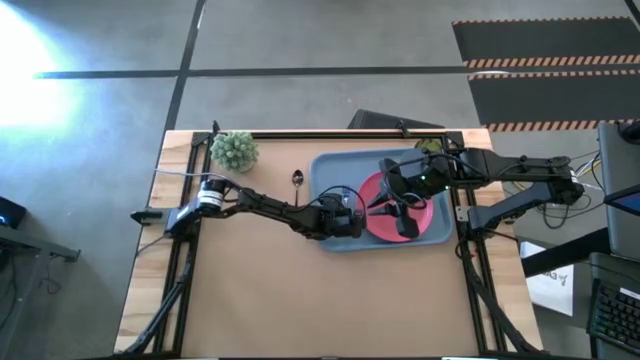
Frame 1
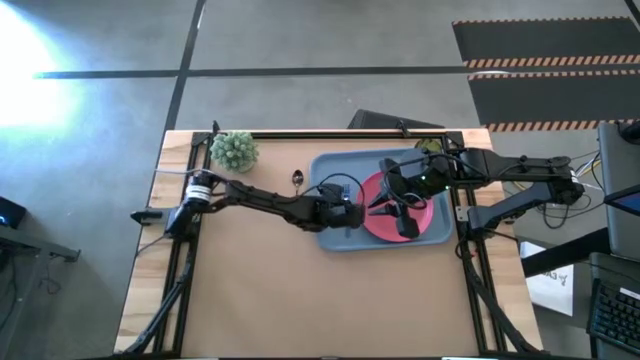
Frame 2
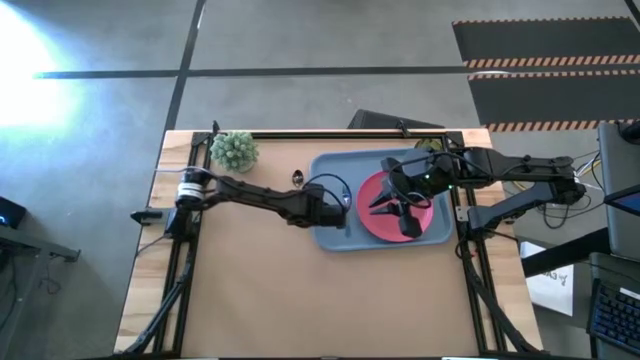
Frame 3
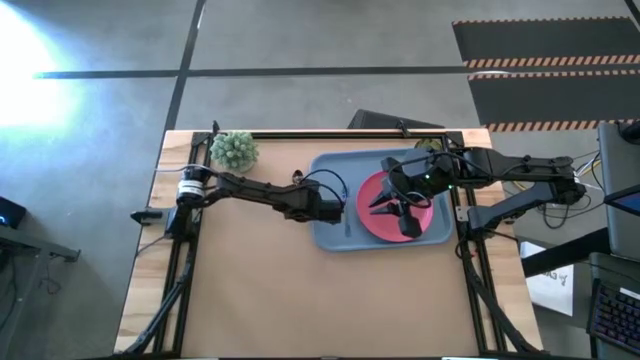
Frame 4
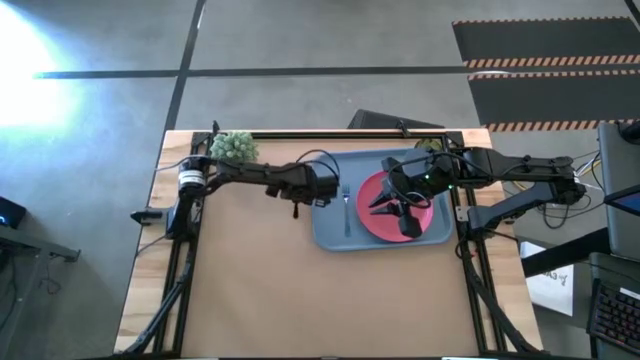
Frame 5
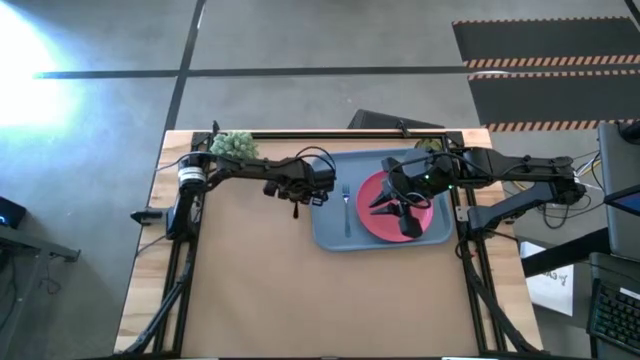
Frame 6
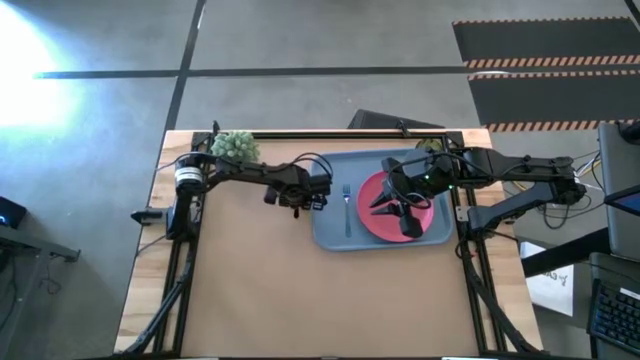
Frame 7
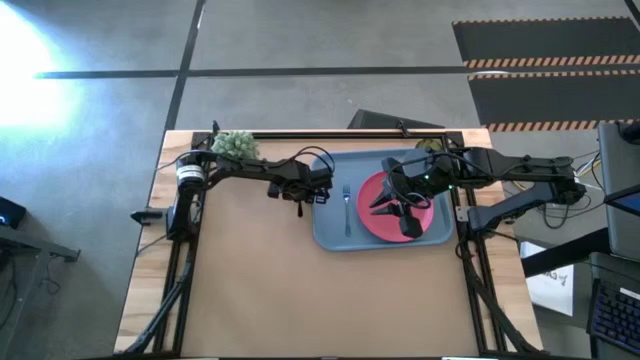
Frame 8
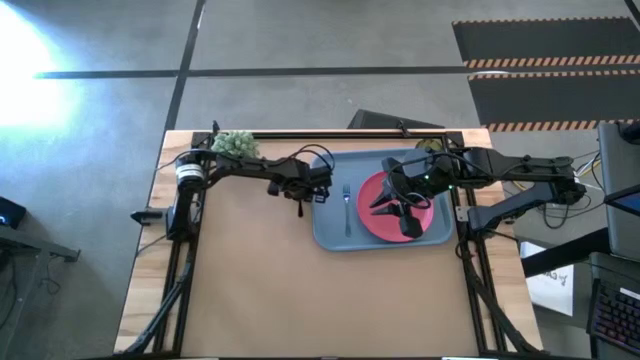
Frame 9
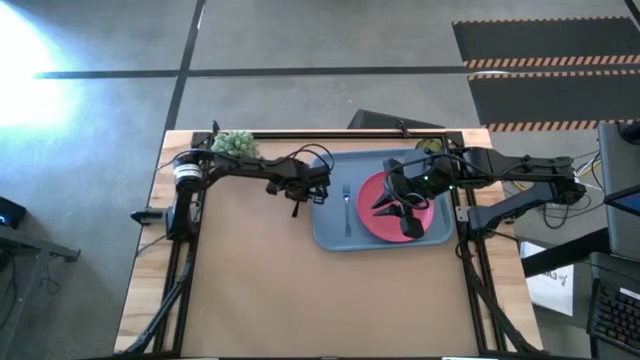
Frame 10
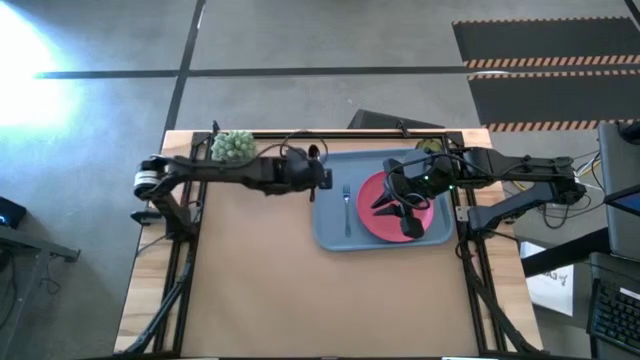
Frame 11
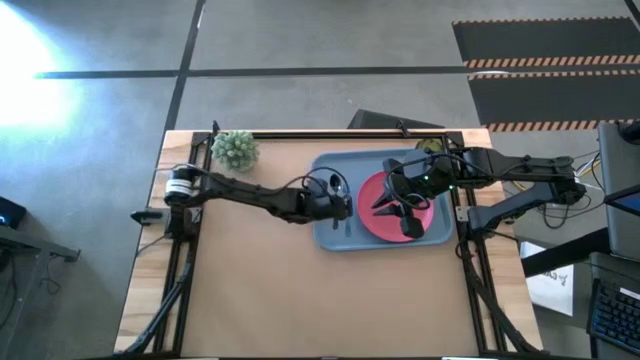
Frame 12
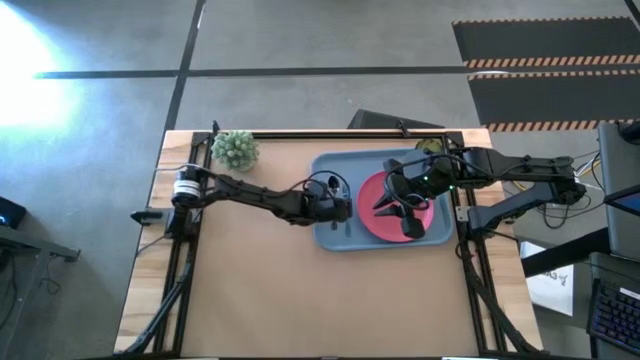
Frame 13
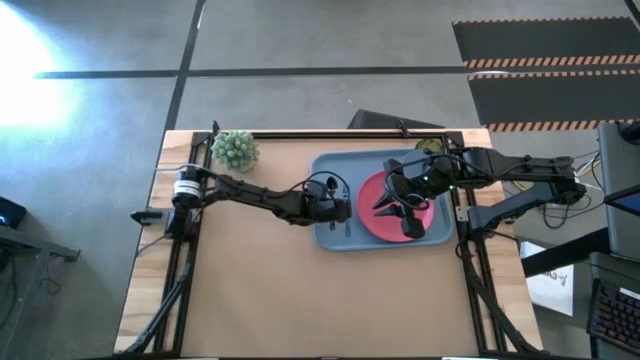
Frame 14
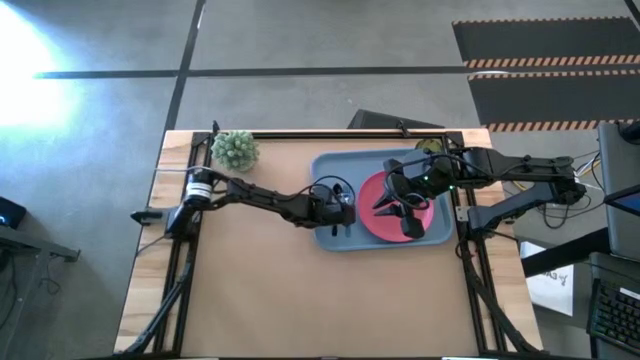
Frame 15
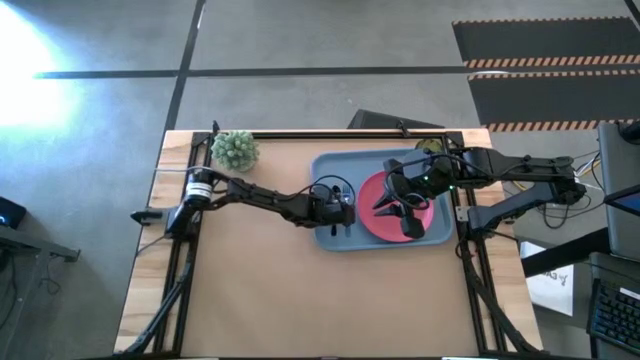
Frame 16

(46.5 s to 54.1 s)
Task: Pick and place plate/cup/fork/spoon on tray
Put the black spoon on the left of the iridescent fork

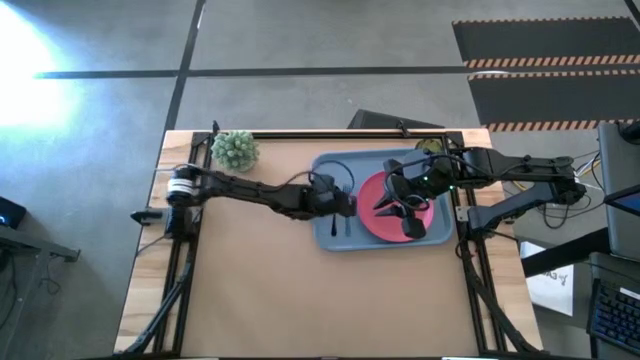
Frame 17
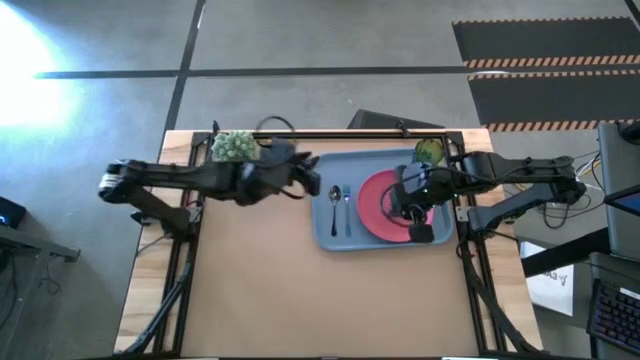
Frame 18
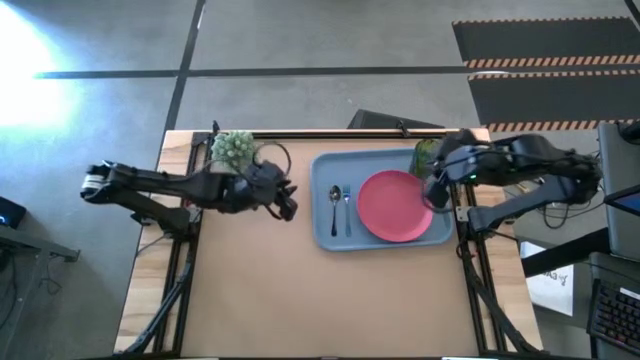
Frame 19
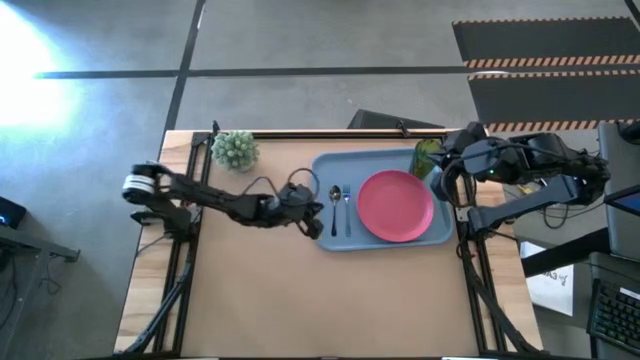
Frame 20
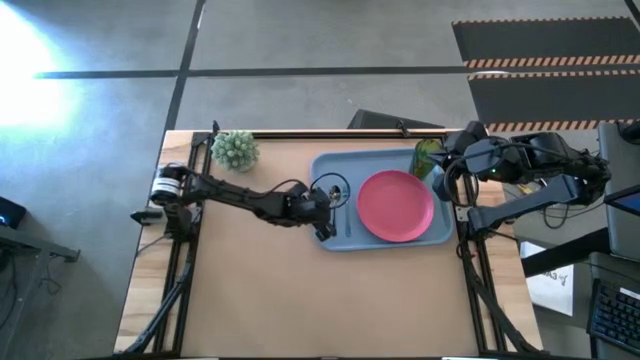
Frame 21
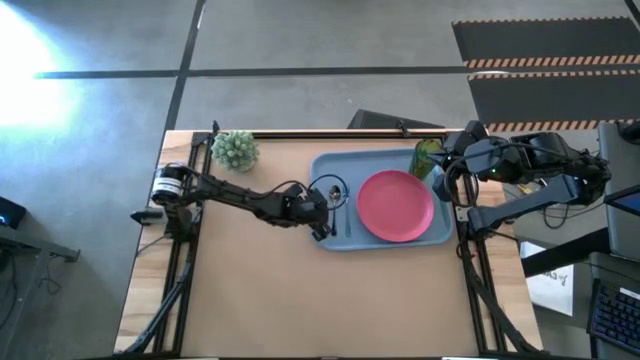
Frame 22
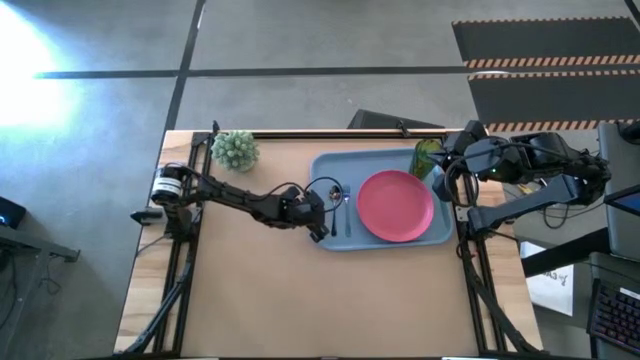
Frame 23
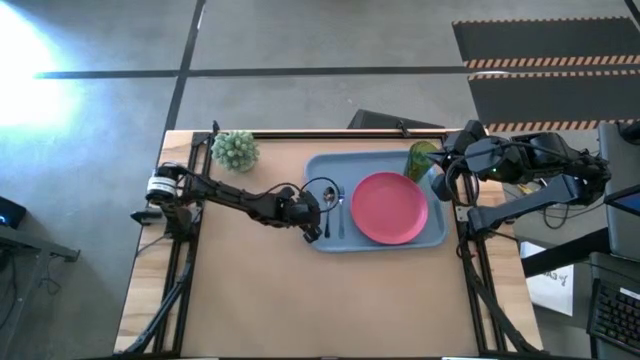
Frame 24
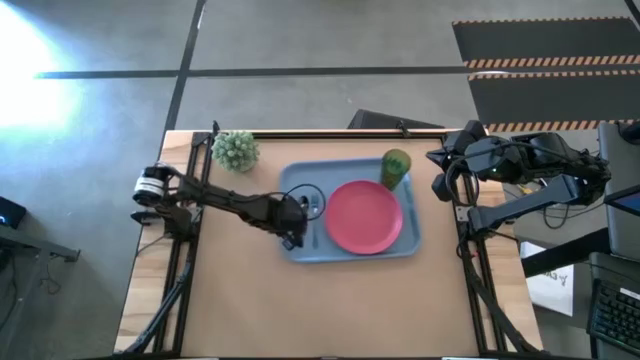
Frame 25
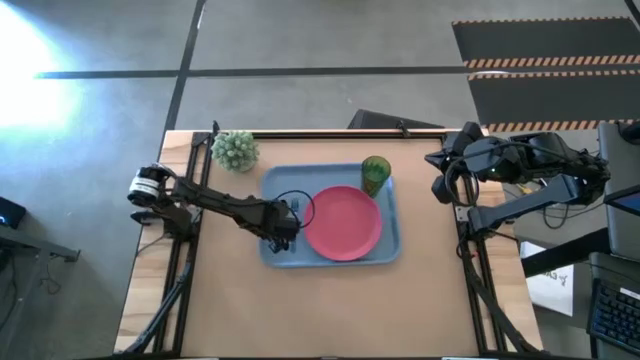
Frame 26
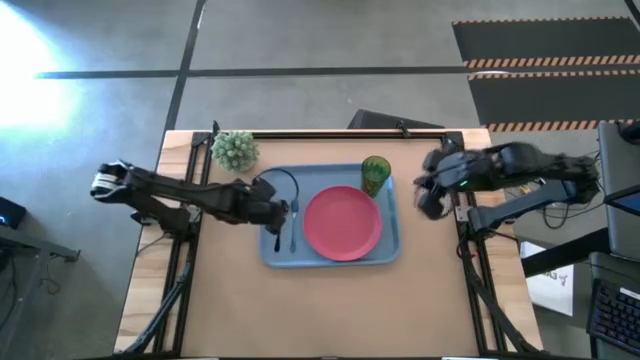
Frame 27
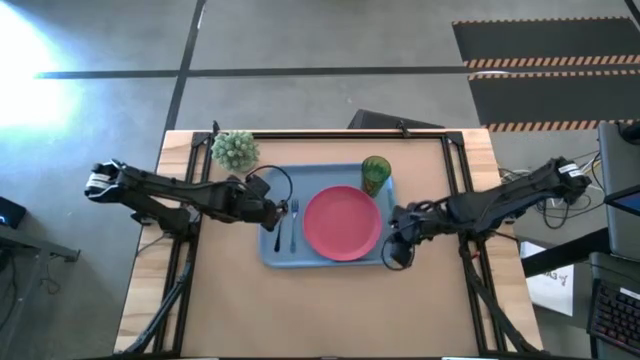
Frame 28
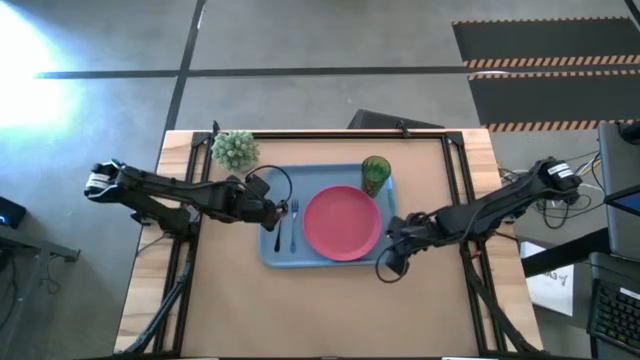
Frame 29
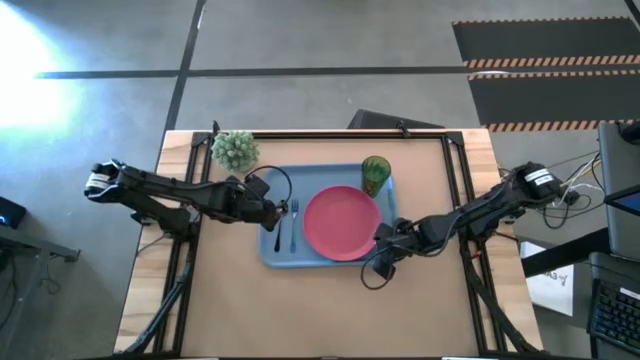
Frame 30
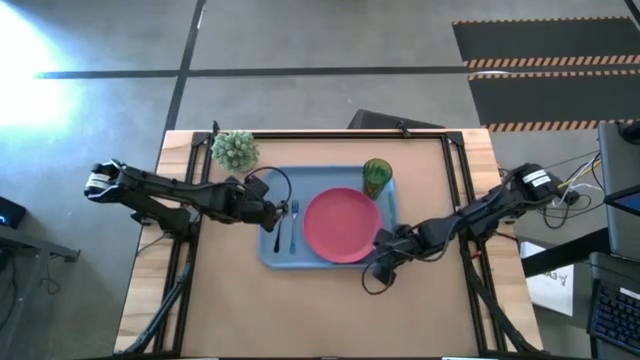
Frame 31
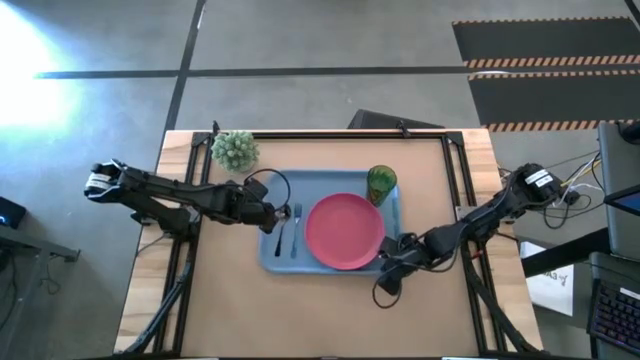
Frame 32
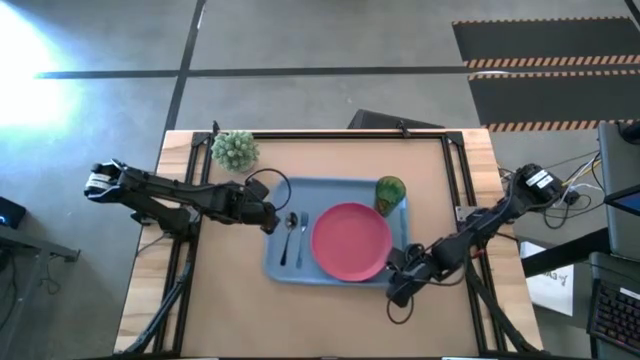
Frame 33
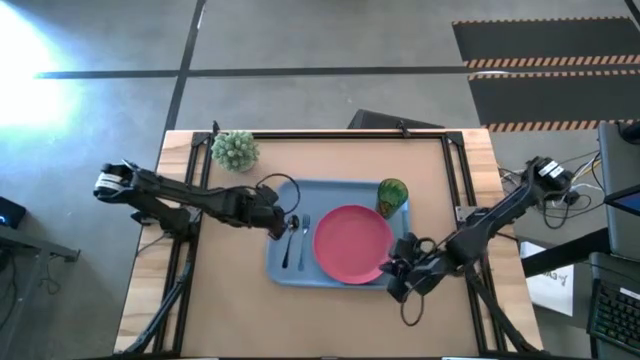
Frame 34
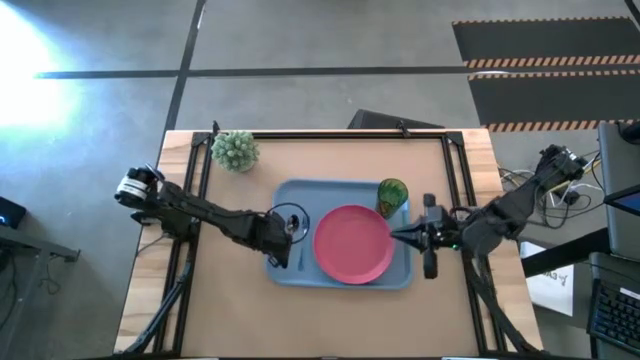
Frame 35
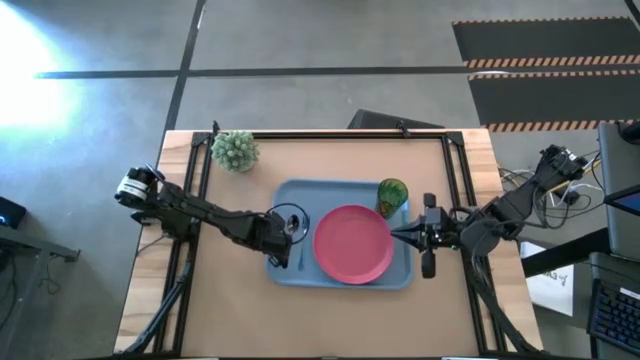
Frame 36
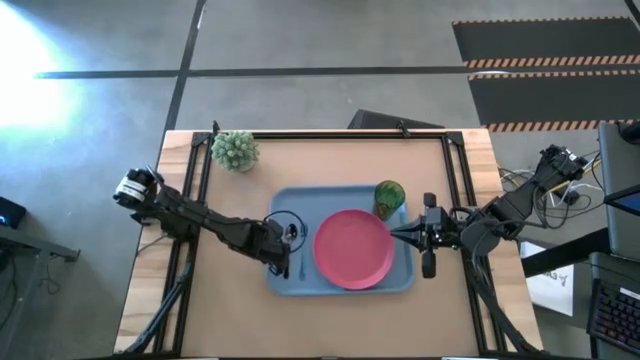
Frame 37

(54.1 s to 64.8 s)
Move the blue tray to the center of the table

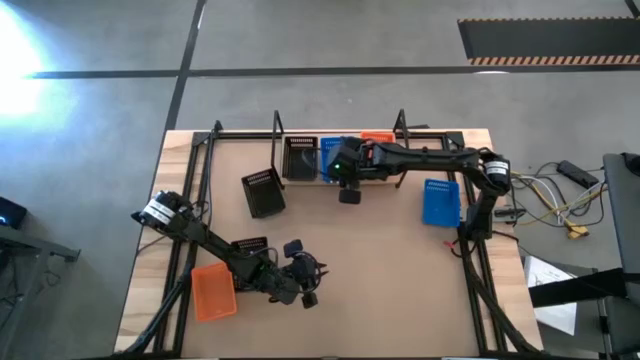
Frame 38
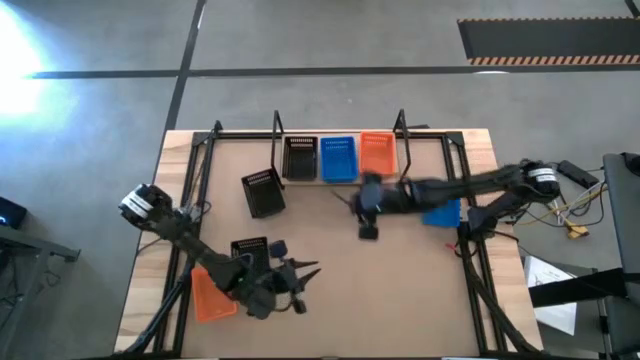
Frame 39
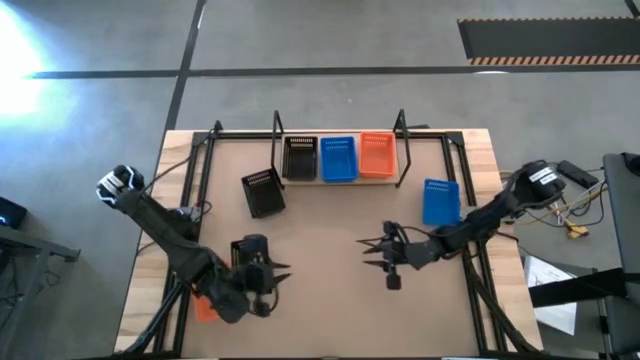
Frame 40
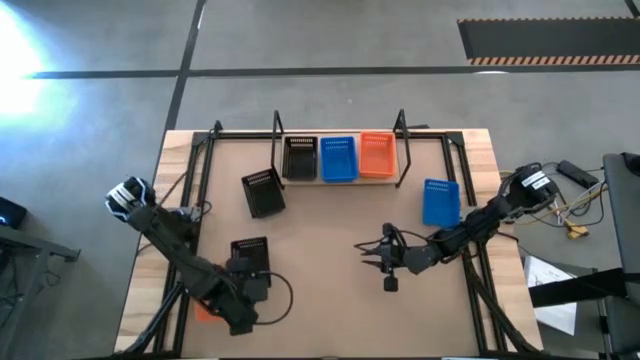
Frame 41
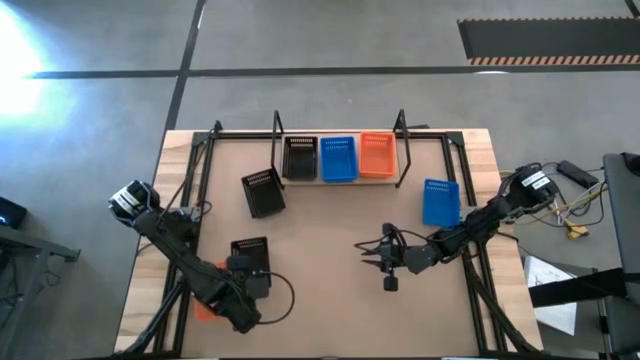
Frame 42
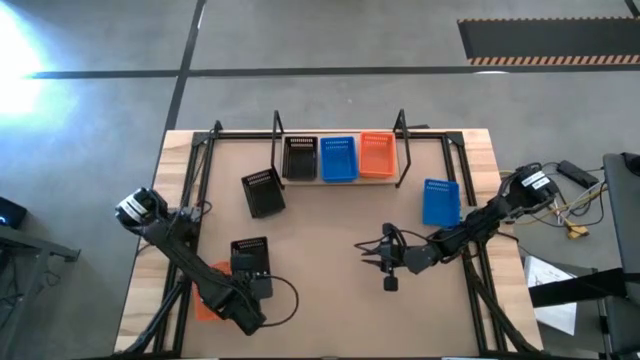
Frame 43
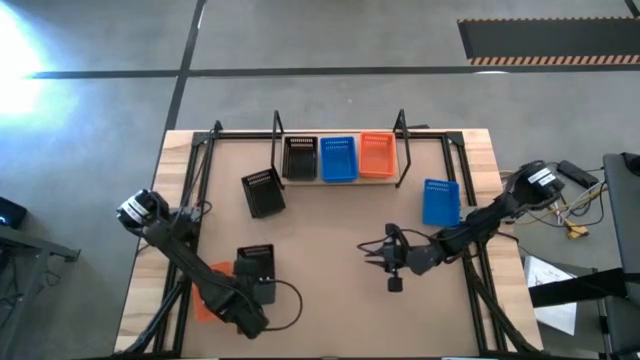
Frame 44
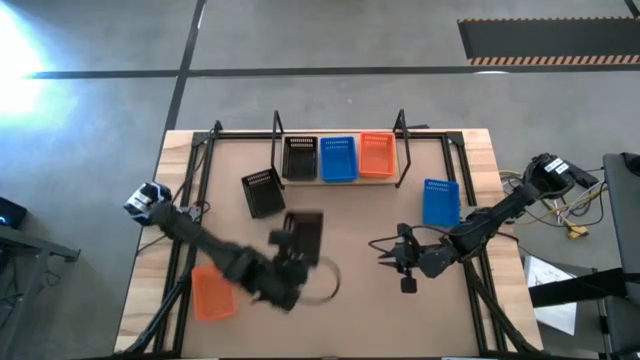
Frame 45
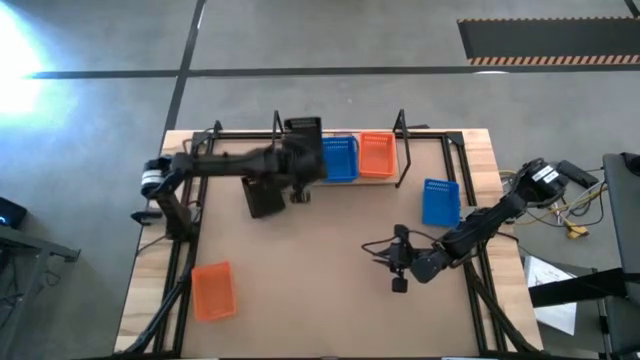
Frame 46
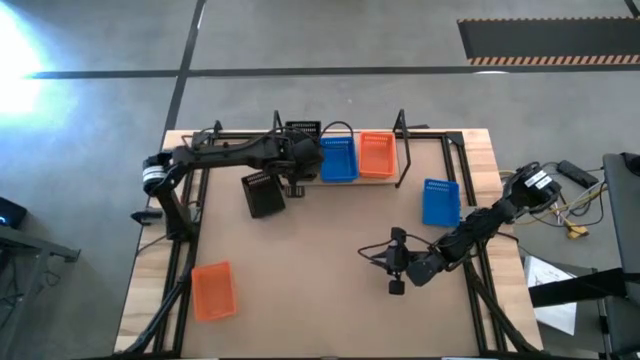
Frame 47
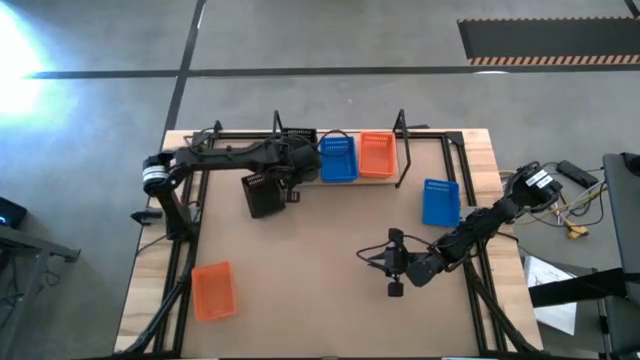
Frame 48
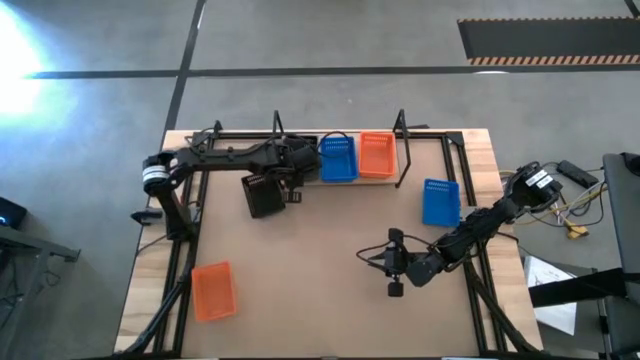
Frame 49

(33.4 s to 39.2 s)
Task: Stack baskets on shelf by color
Stack the bottom black bin on the black bin on the shelf
